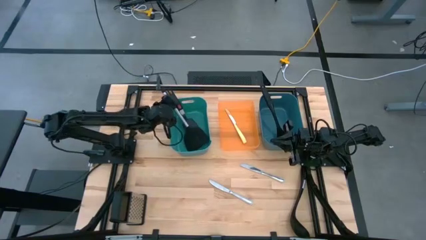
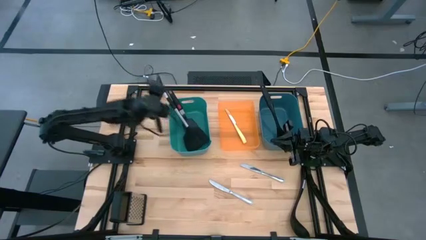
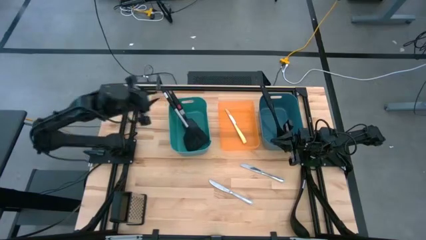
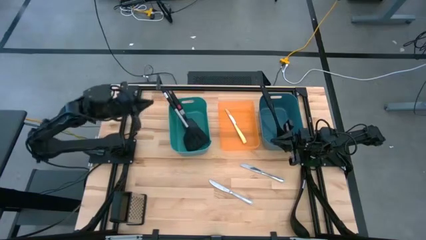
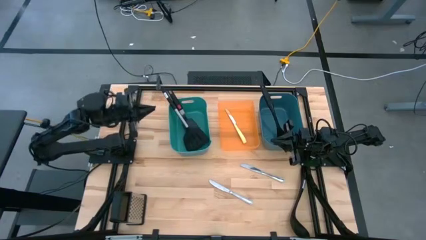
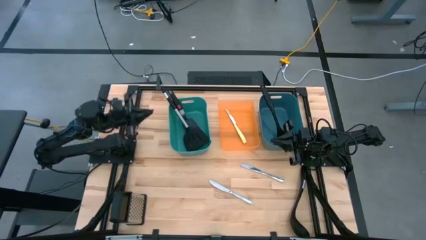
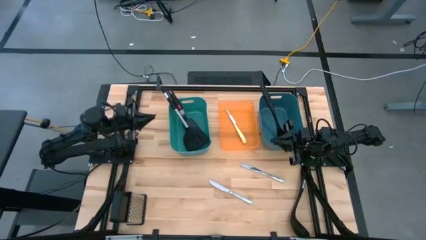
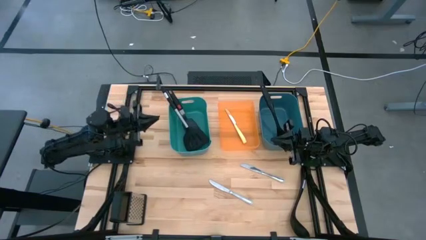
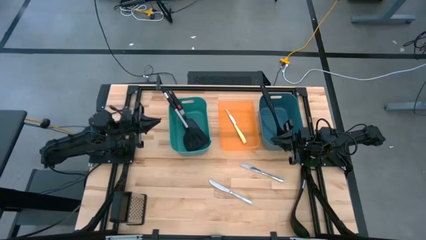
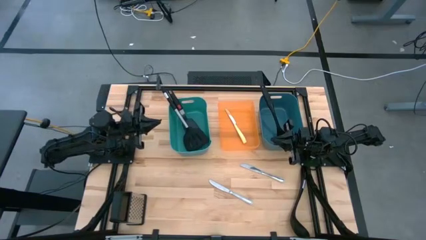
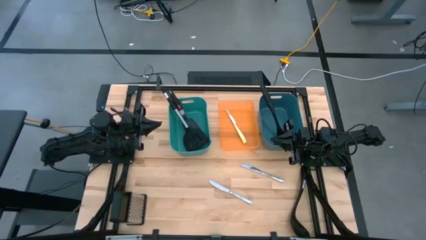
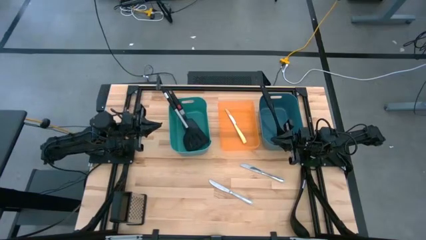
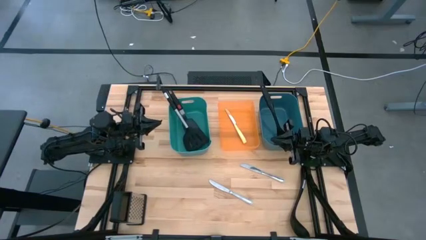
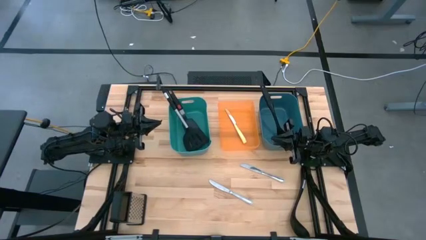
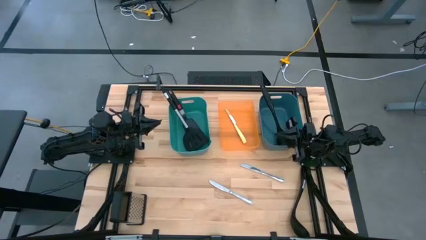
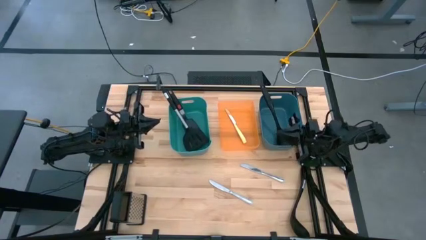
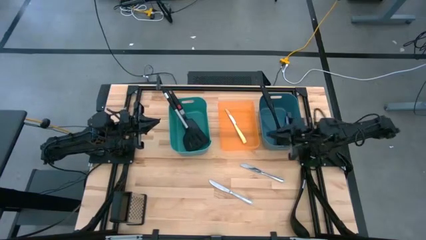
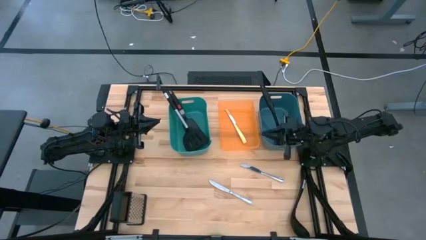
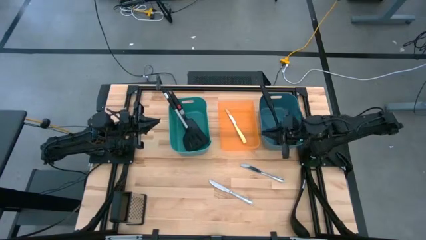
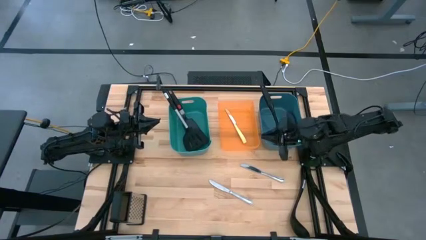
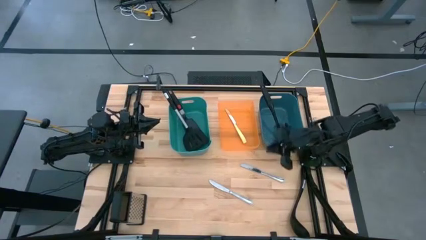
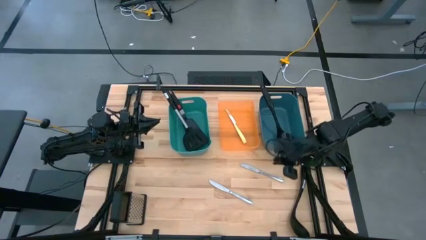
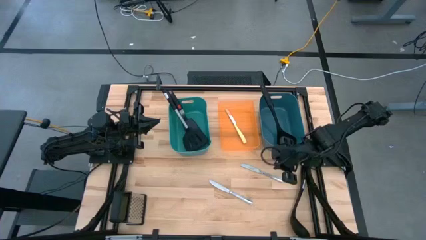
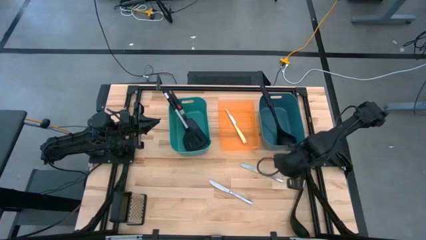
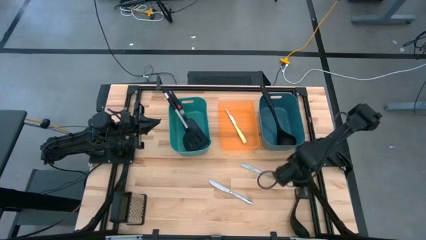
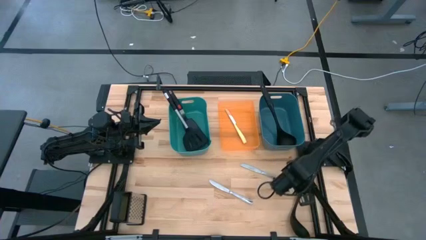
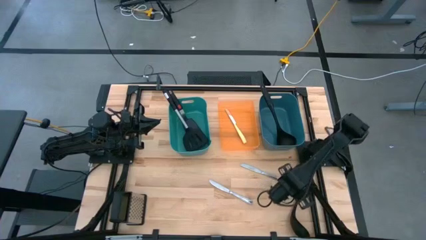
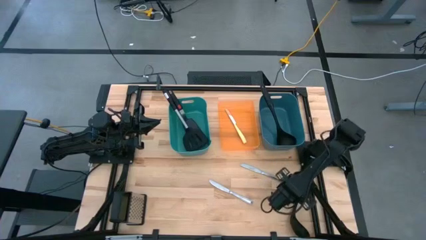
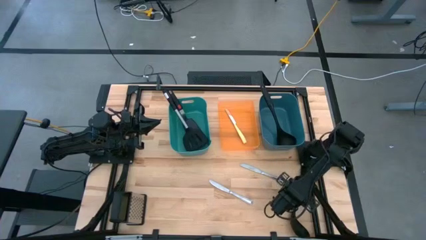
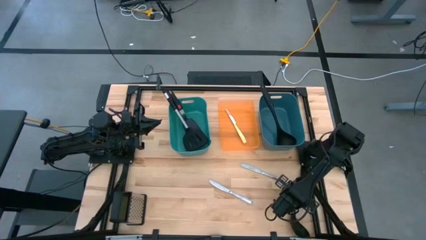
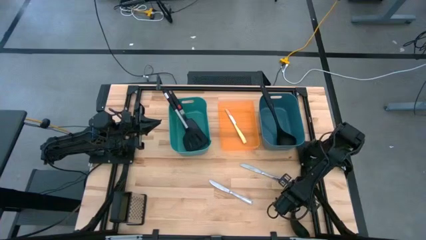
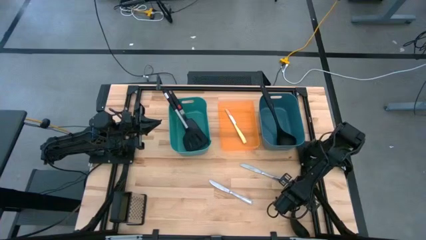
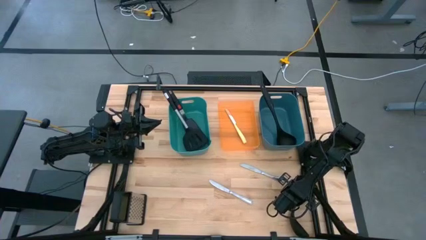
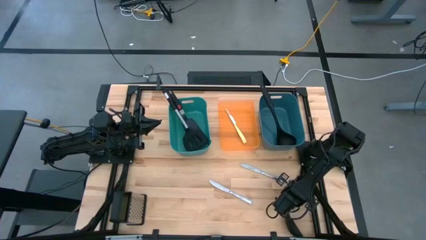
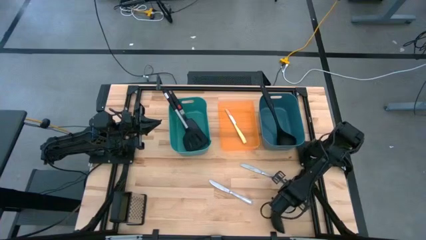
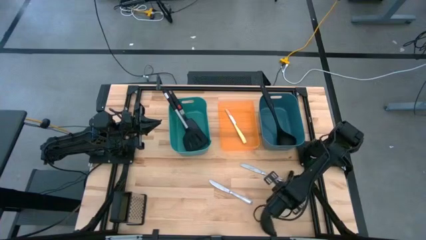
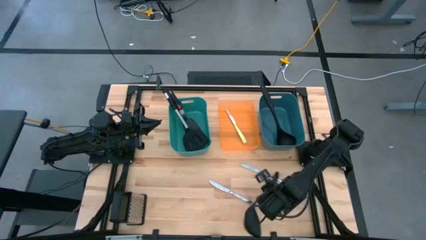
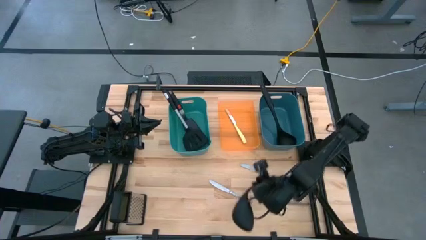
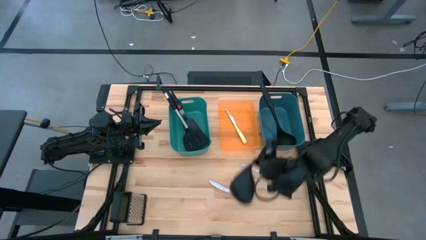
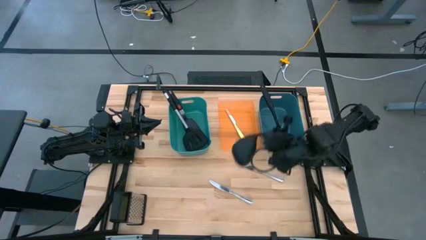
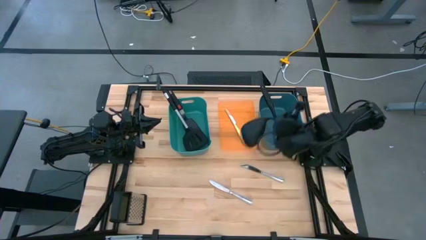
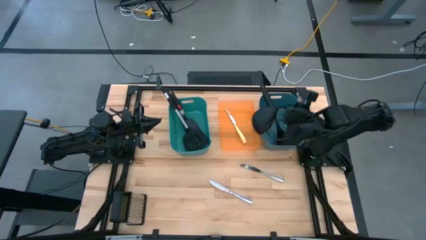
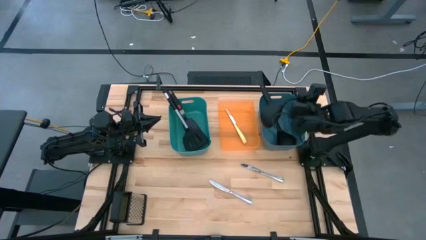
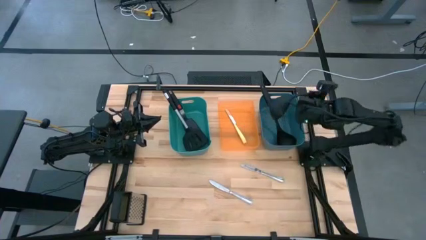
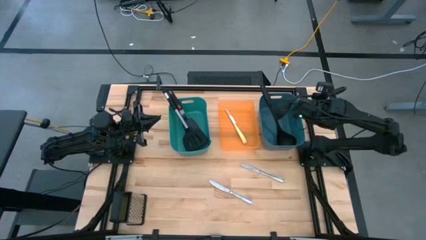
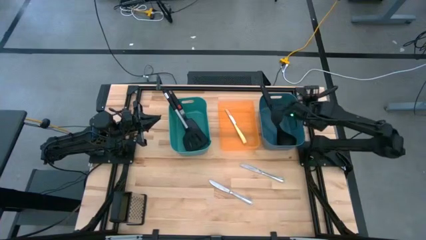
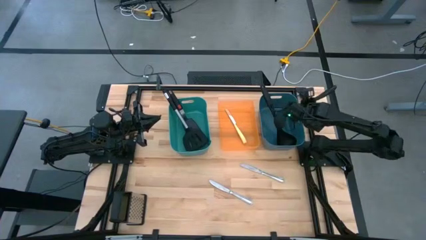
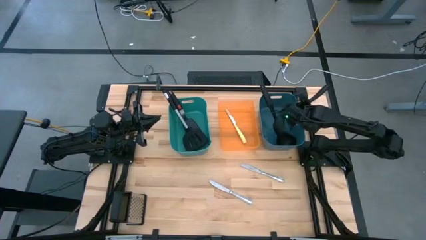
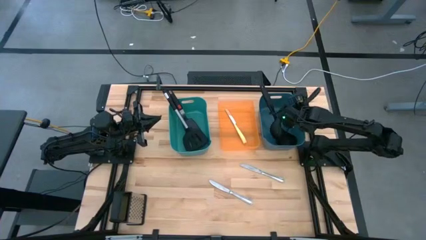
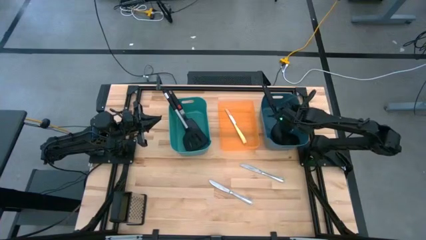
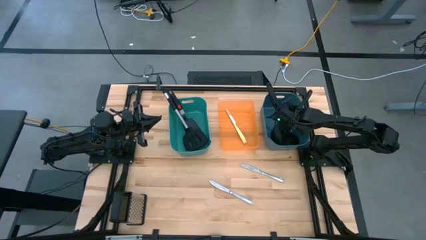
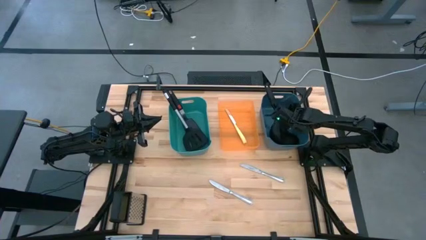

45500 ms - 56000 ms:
Task: Pick & Place Kitchen Items
Put the black ladle into the blue bin

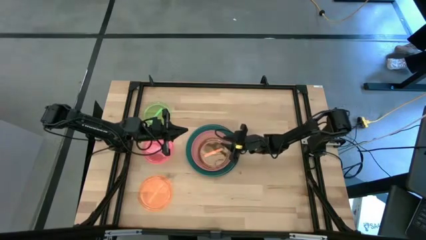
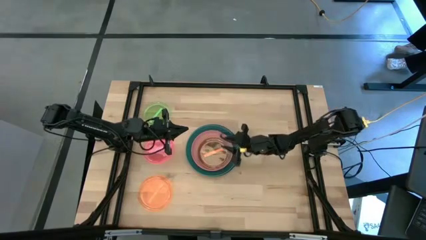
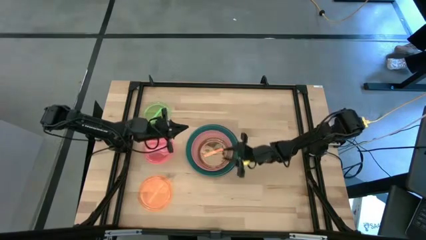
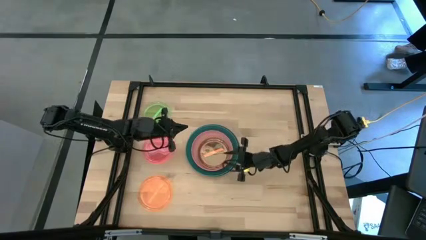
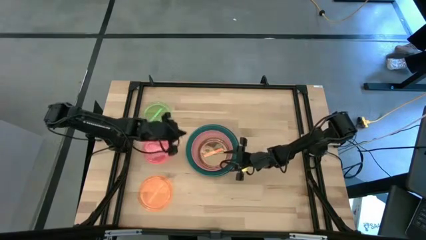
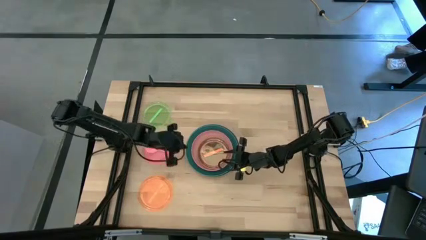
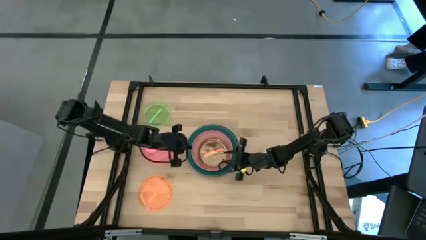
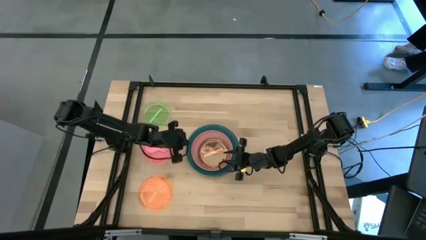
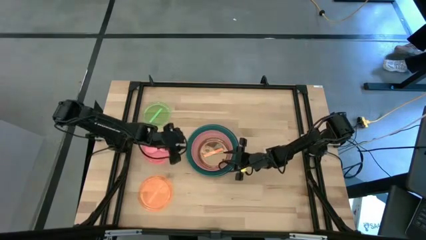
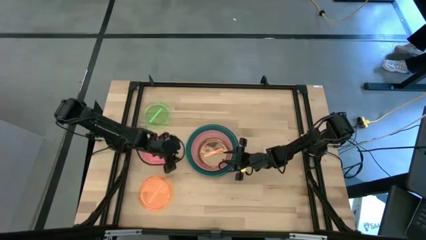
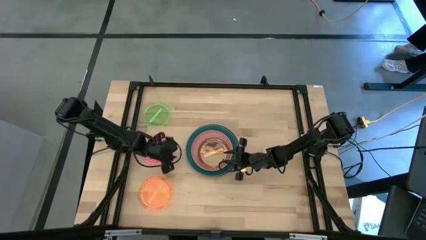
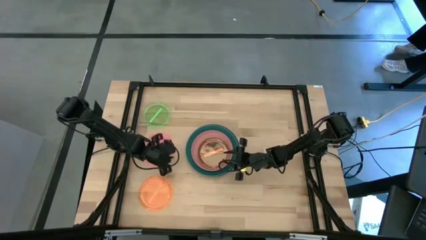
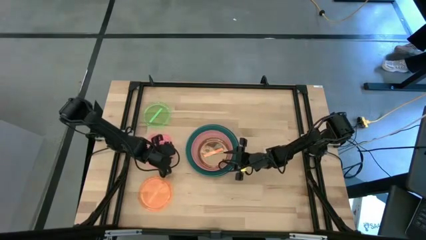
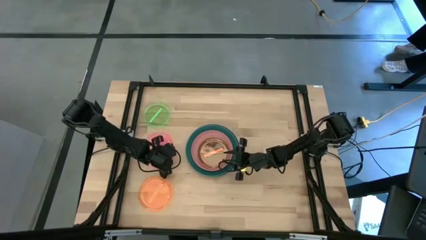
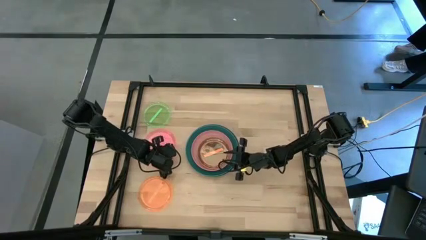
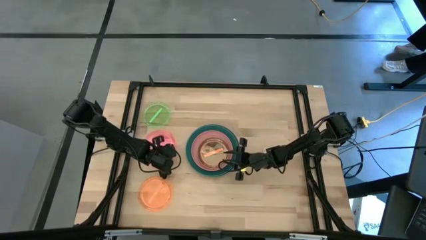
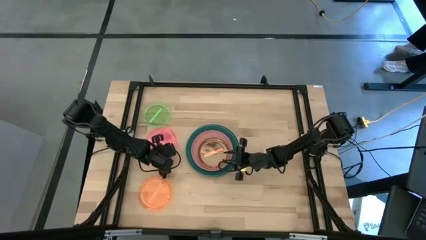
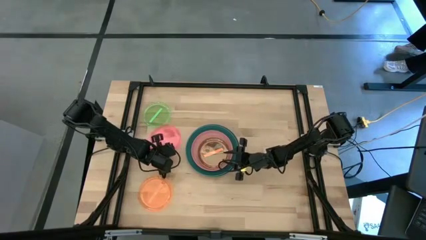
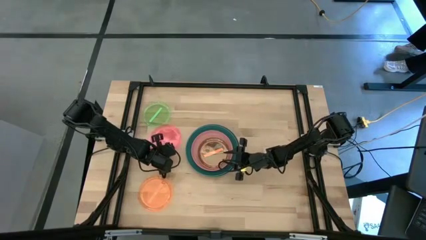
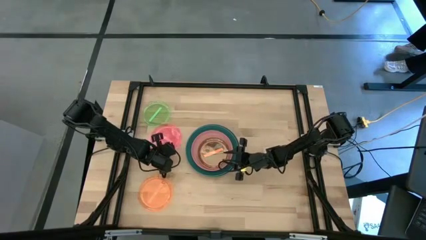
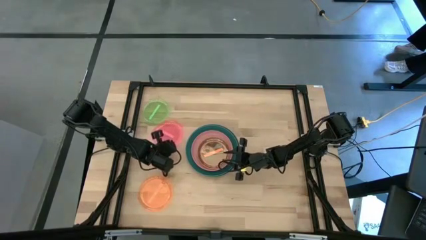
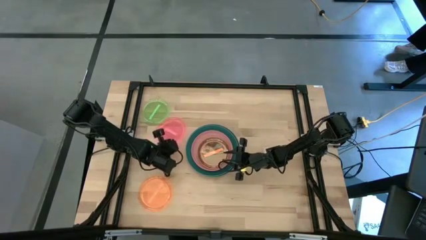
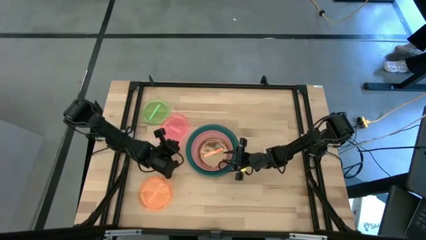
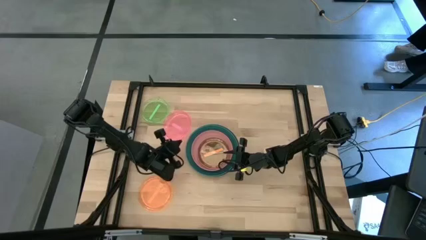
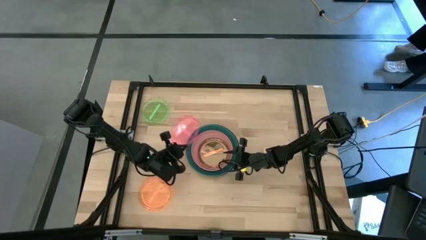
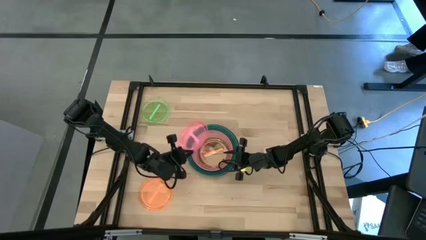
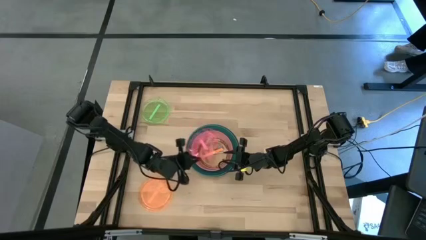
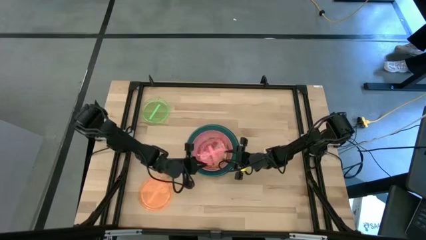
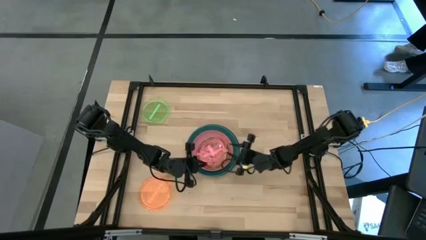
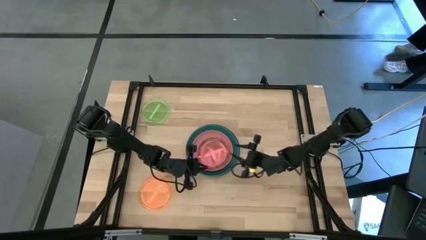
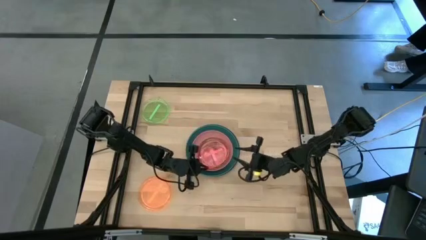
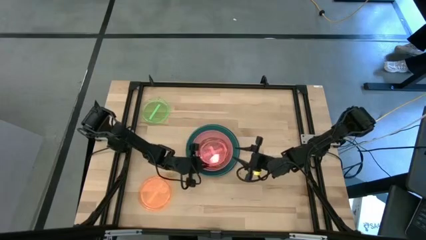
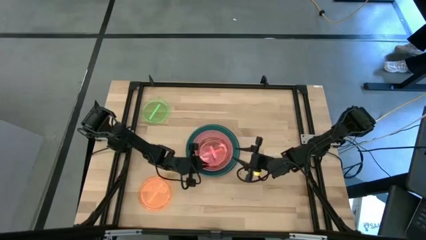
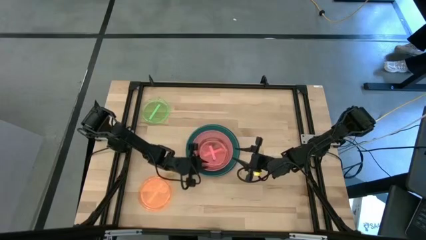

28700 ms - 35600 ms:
Task: Stack plastic plates
Stack the light pink plate on top of the orange plate
